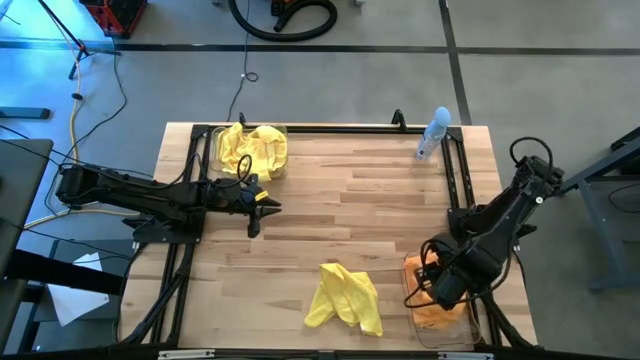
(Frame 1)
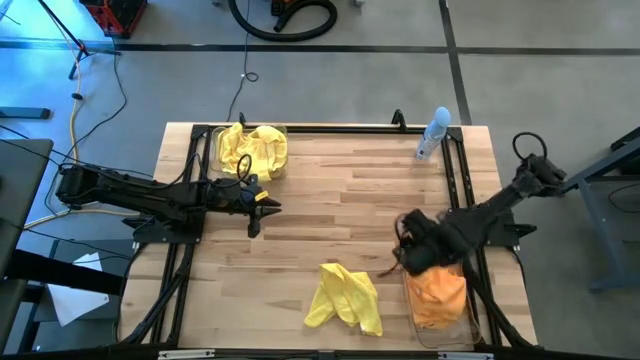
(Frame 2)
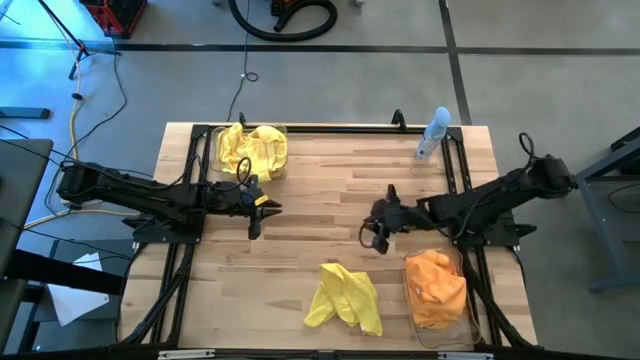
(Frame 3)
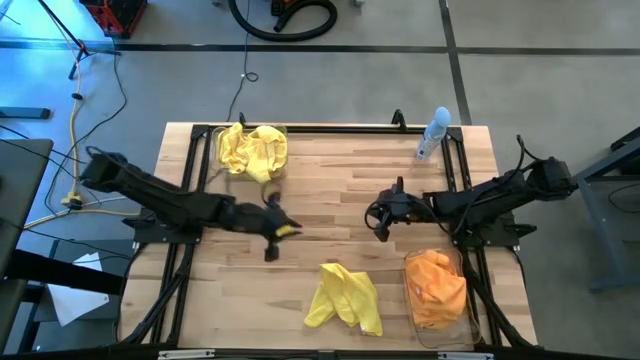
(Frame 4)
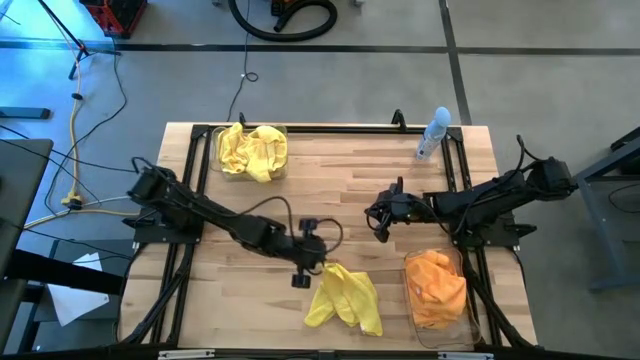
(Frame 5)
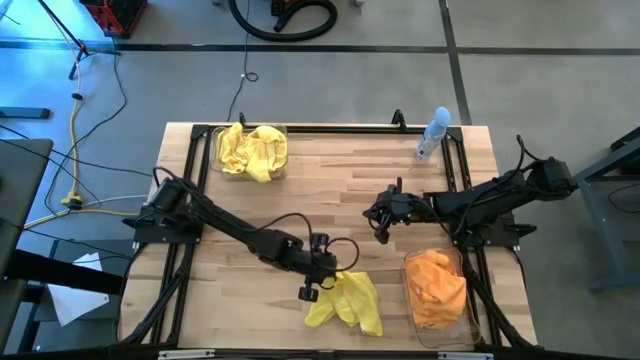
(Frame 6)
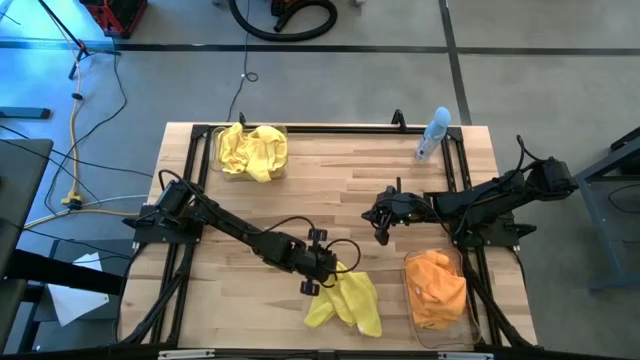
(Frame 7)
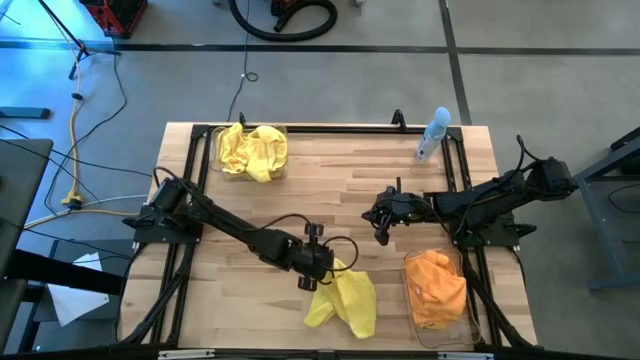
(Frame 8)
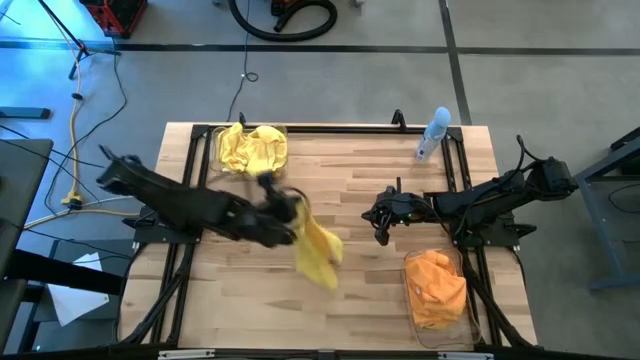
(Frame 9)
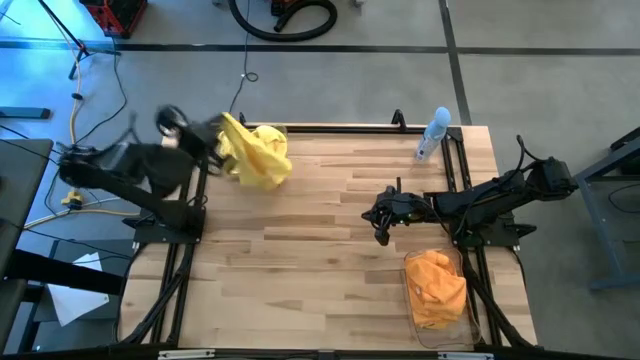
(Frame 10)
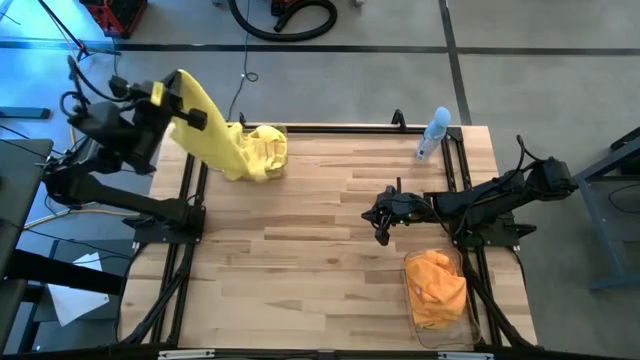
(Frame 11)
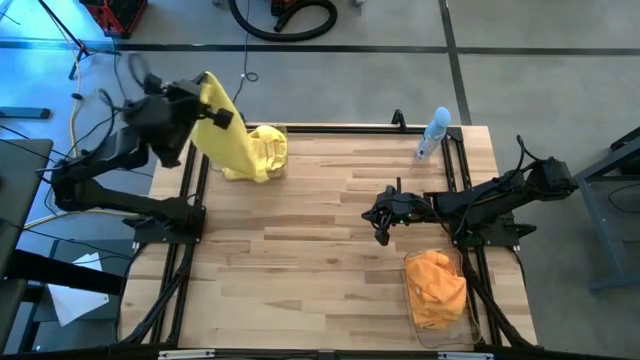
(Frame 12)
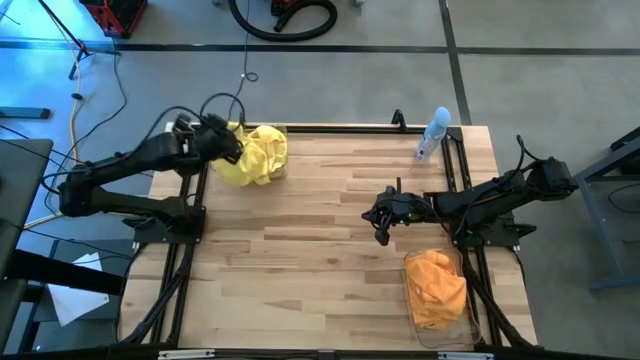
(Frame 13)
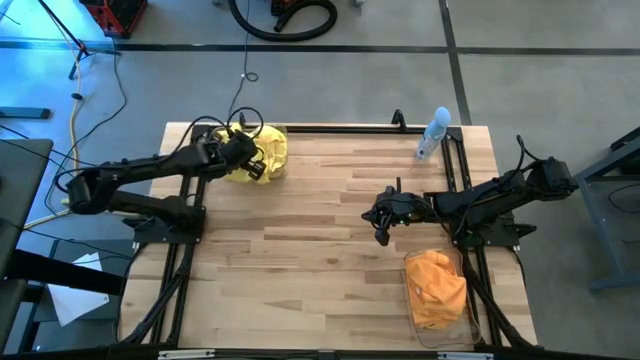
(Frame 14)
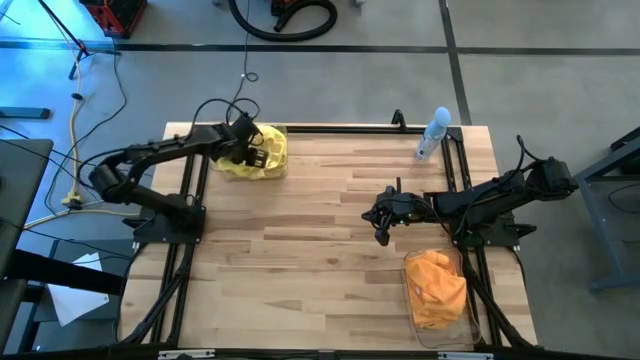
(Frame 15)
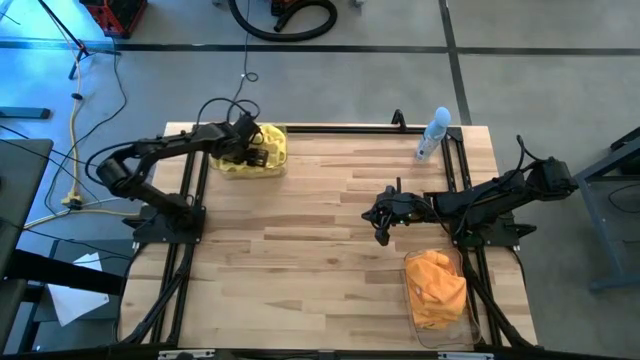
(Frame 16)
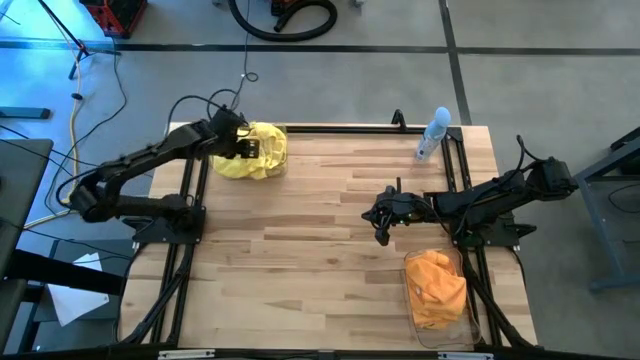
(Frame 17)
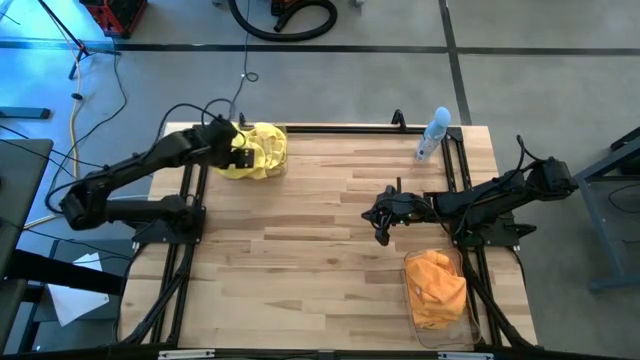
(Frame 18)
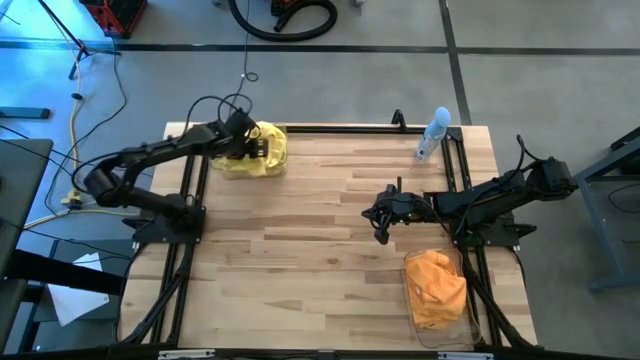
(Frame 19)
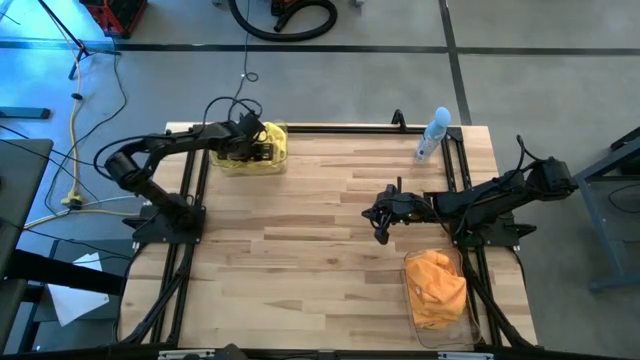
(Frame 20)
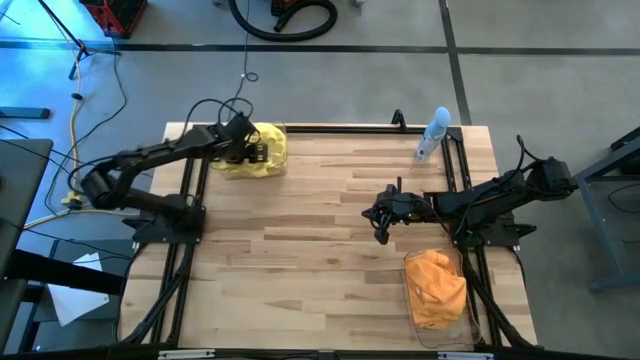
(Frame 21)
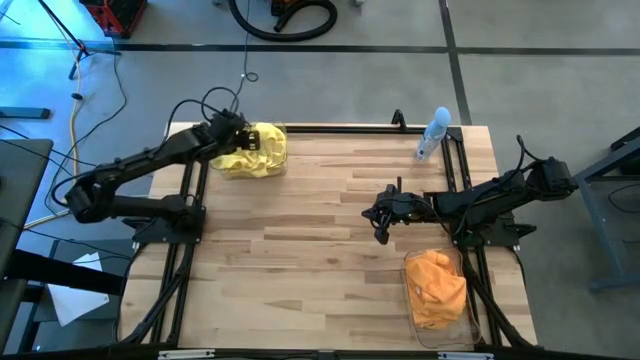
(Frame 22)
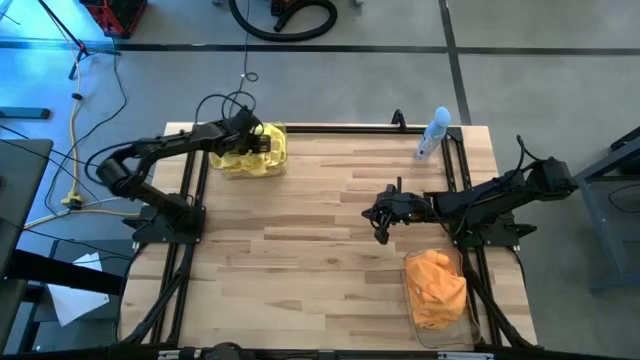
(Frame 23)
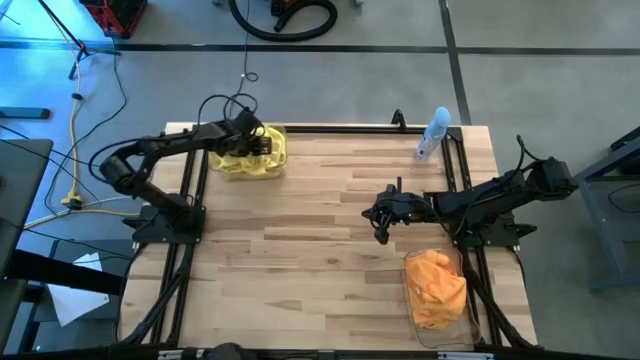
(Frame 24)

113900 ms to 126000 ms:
Task: Sort microfiber towel by color & place in baskets
Put the yellow towel into the top transparent bin

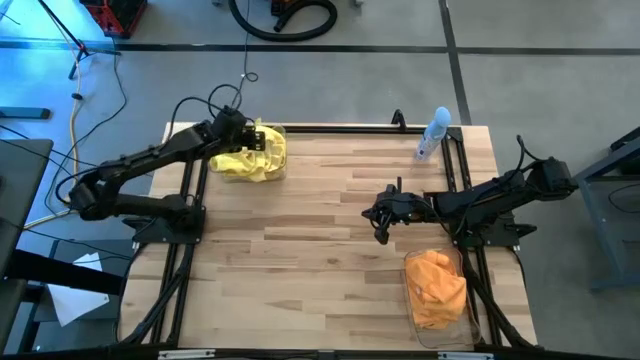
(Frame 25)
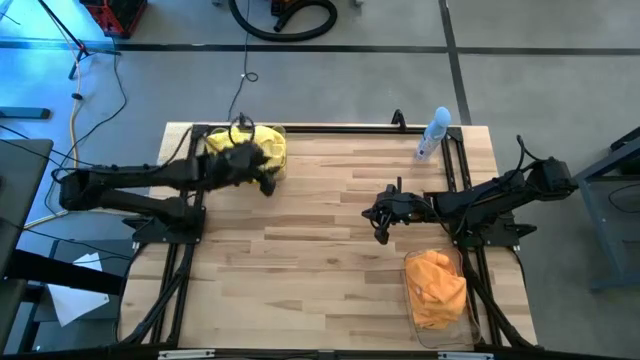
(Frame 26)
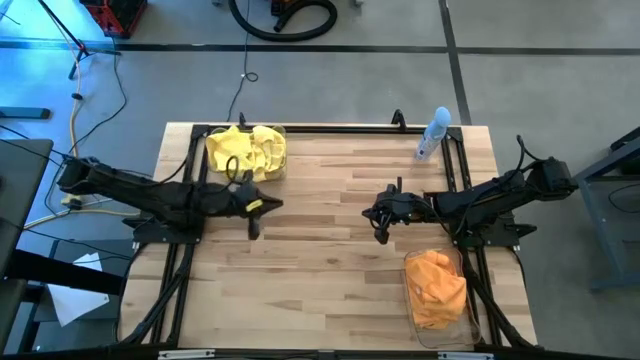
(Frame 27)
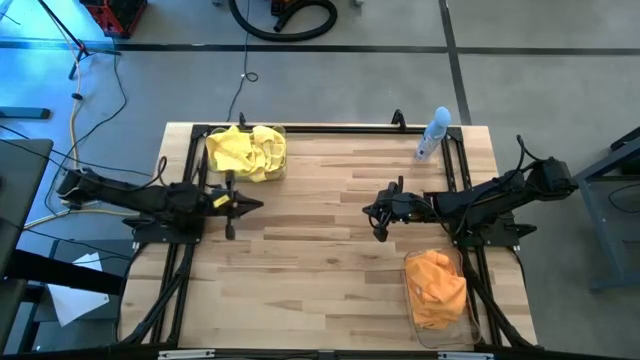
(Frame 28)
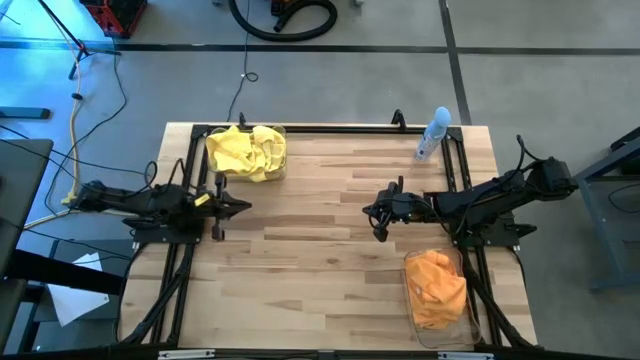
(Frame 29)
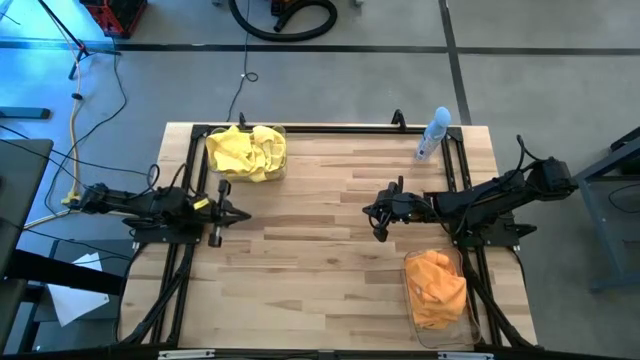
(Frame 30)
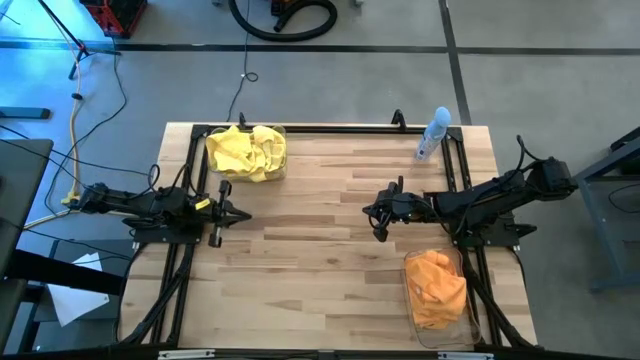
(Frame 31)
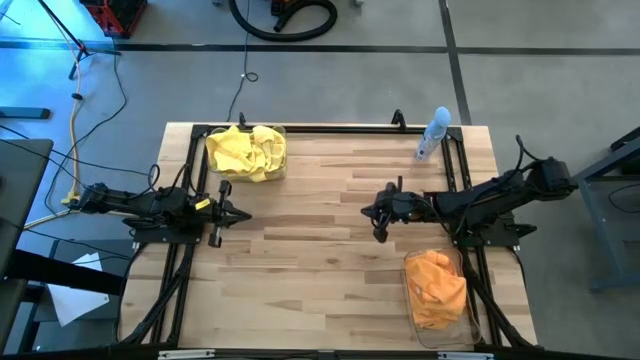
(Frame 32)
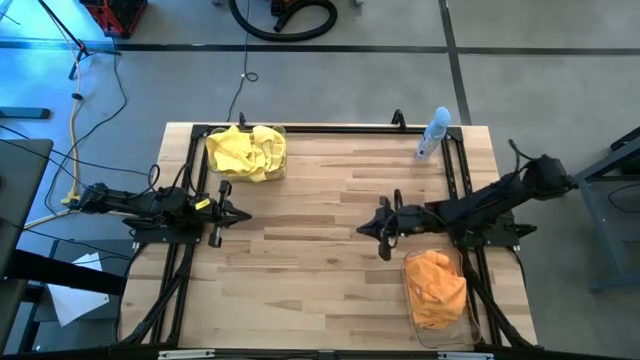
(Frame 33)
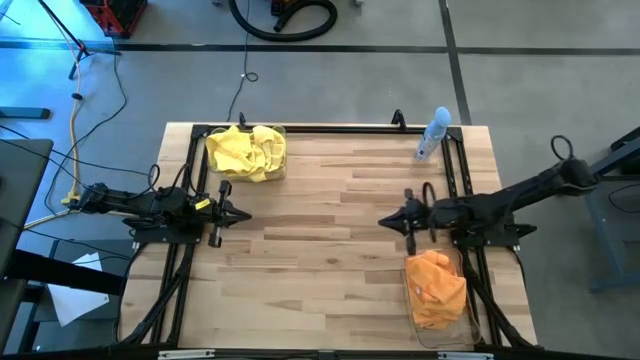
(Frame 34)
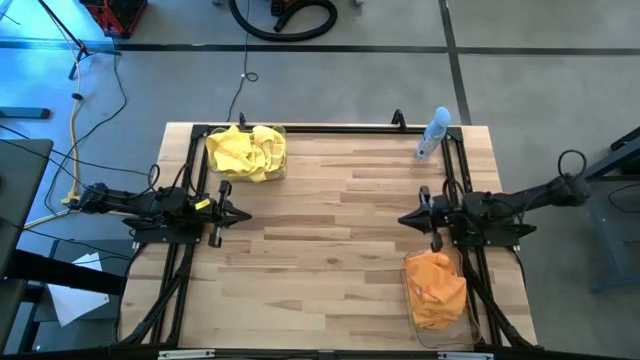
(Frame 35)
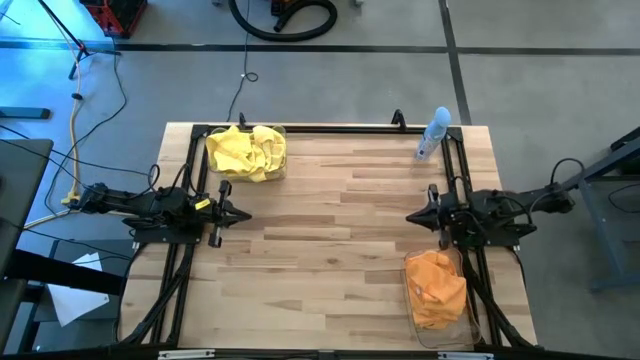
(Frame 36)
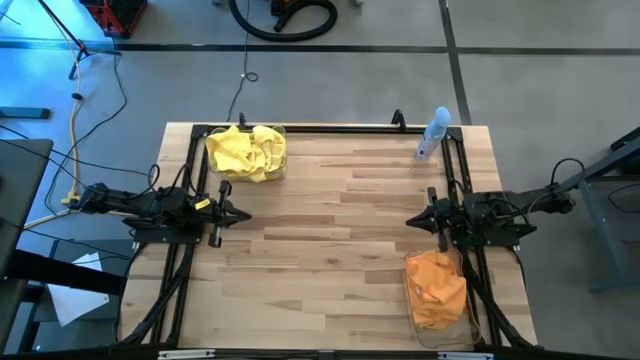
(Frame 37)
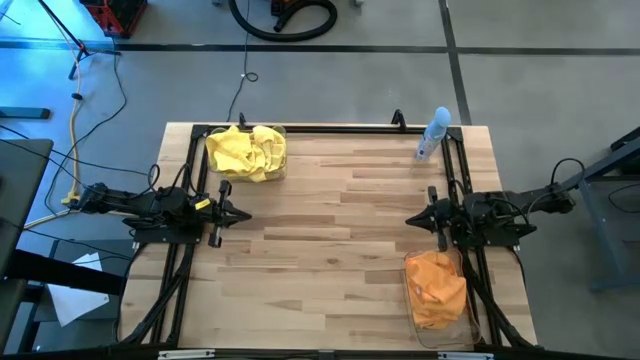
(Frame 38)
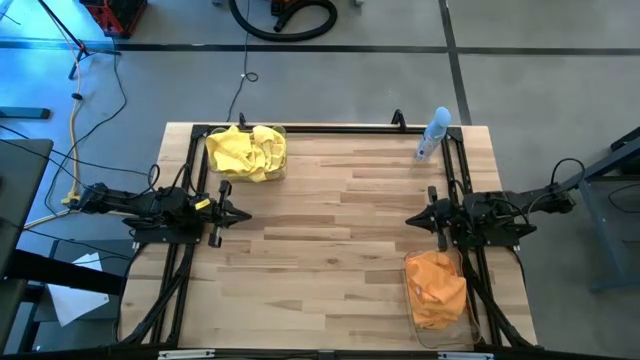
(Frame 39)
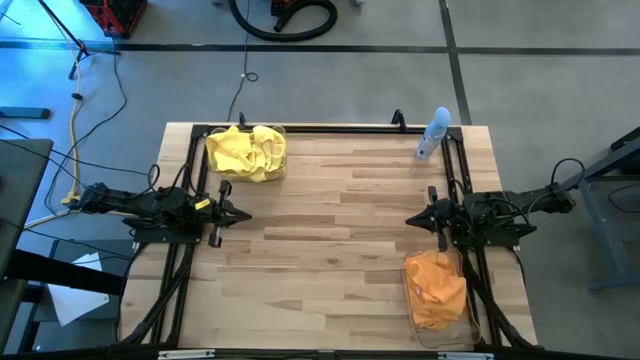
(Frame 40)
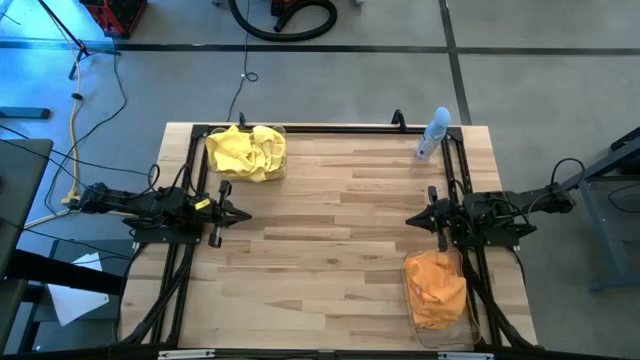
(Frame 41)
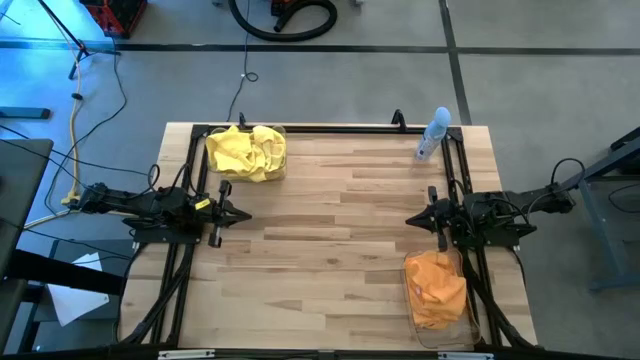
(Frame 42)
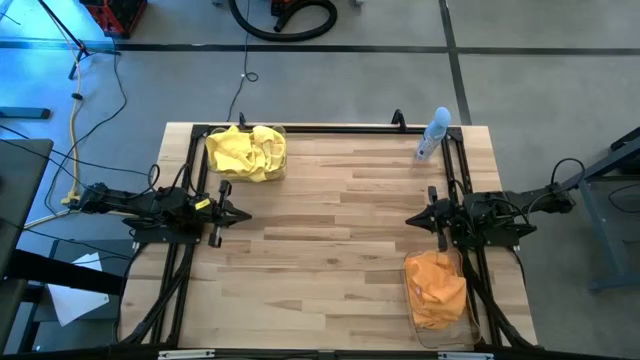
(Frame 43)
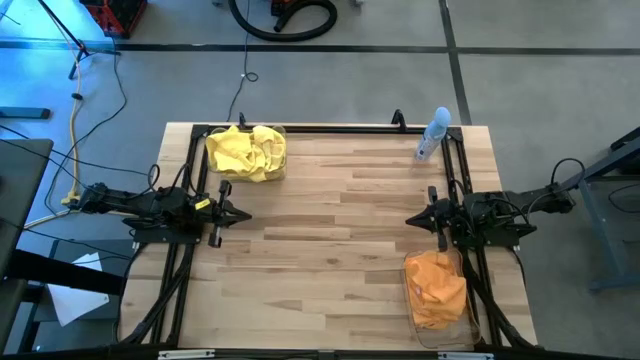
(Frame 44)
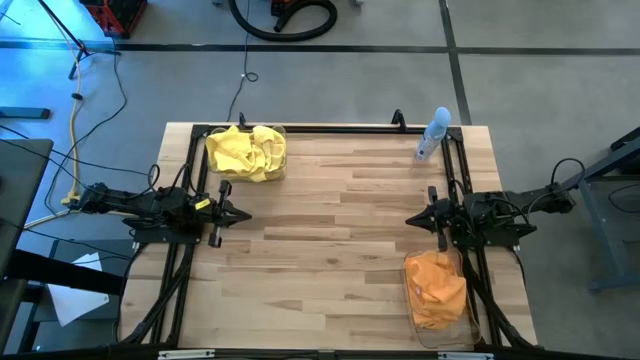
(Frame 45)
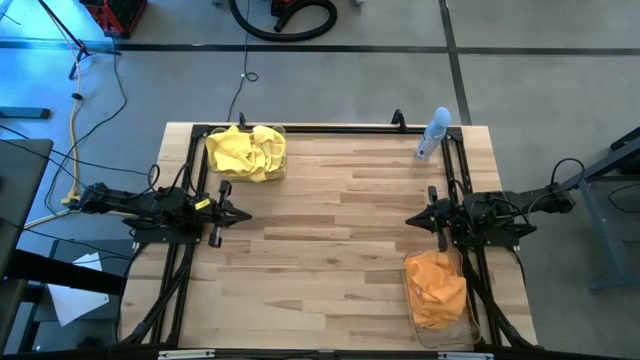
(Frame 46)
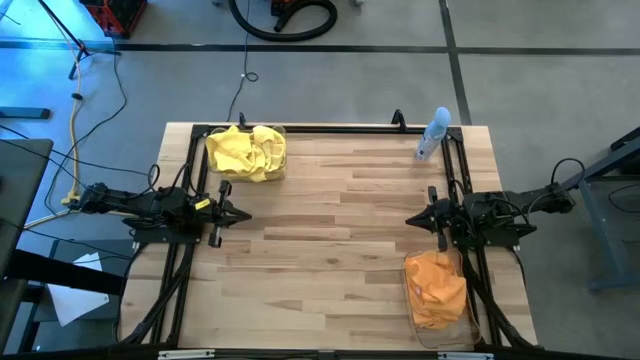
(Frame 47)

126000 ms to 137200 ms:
Return to Home Position
